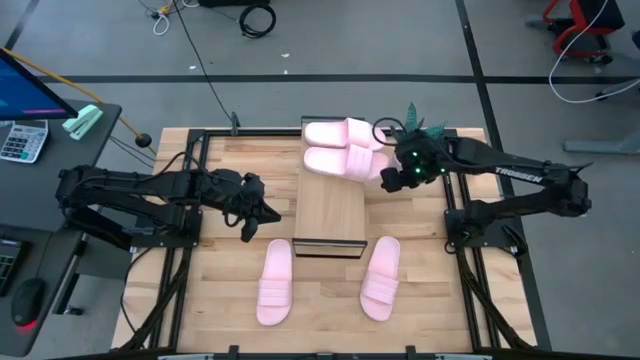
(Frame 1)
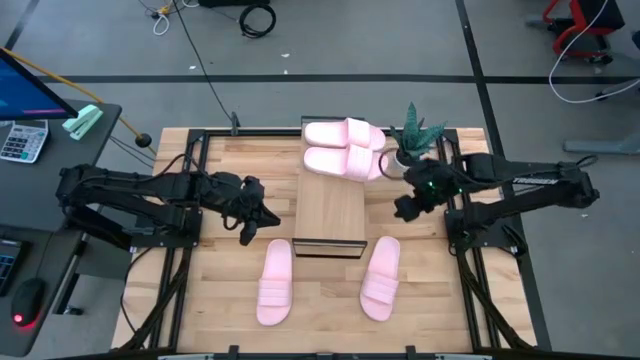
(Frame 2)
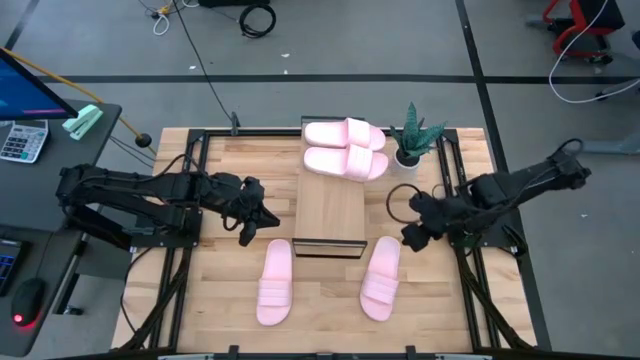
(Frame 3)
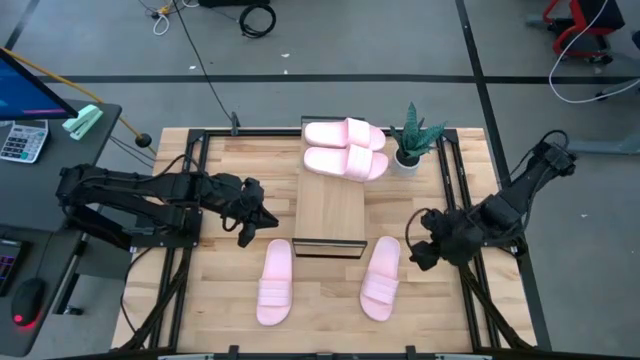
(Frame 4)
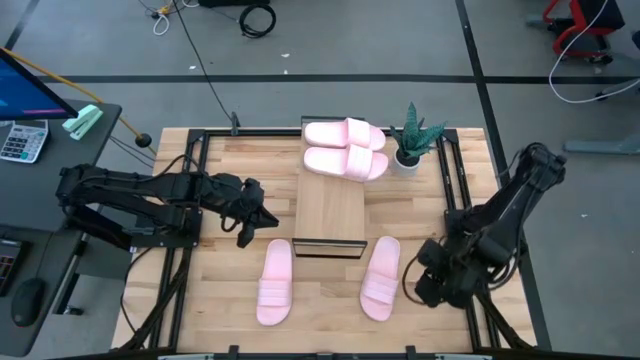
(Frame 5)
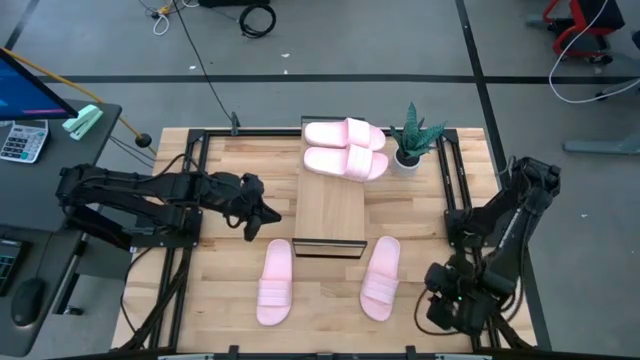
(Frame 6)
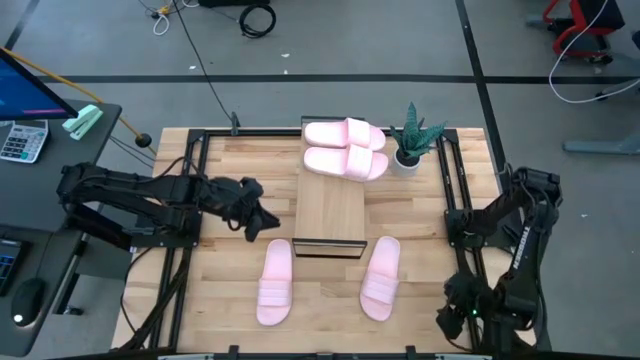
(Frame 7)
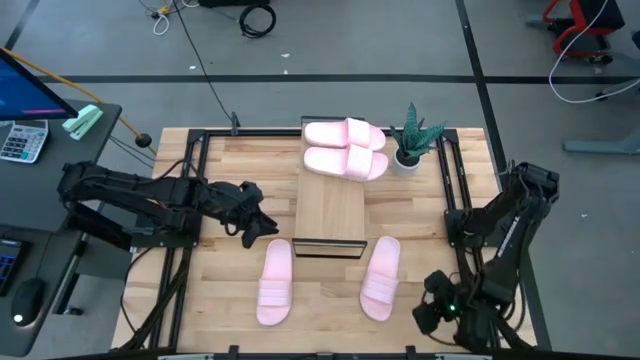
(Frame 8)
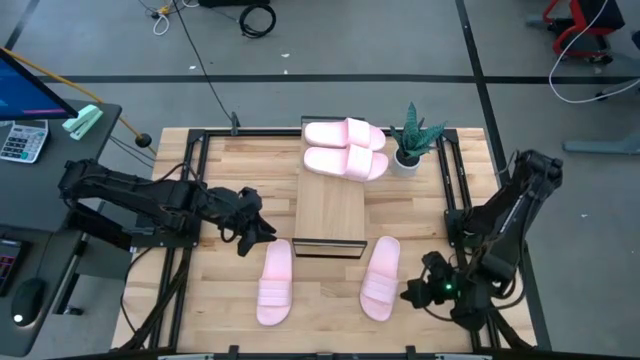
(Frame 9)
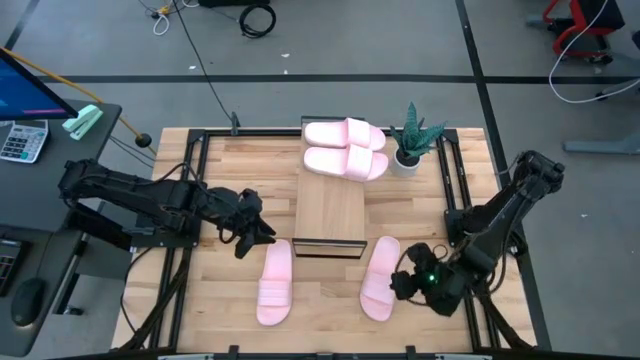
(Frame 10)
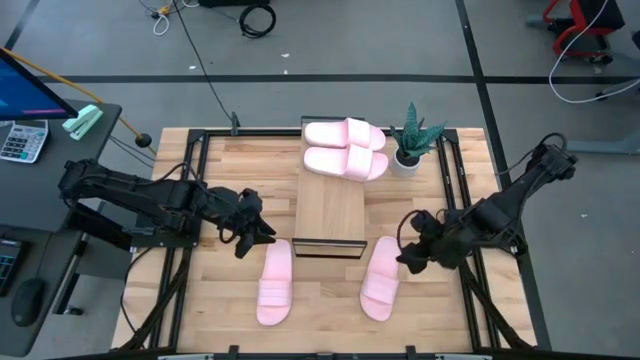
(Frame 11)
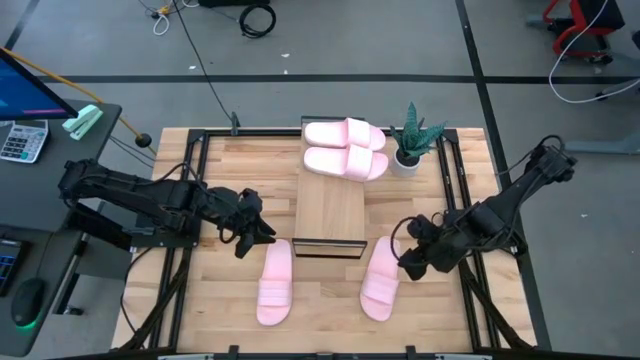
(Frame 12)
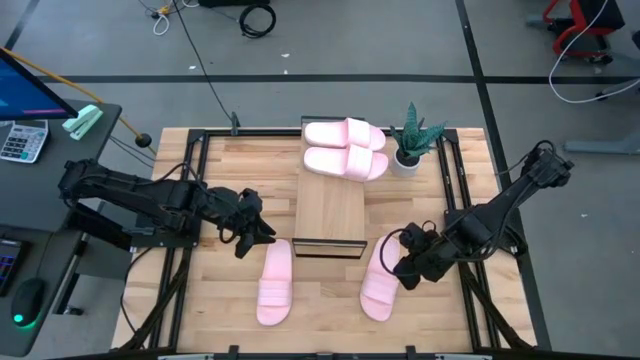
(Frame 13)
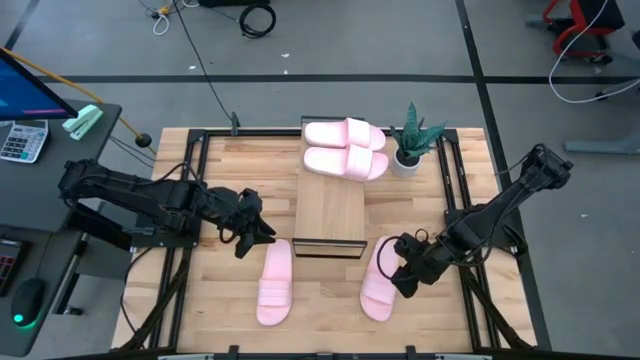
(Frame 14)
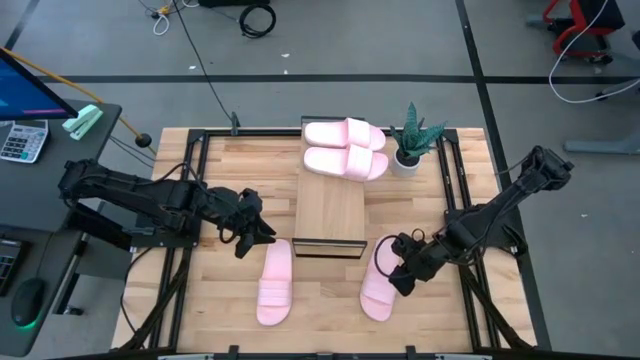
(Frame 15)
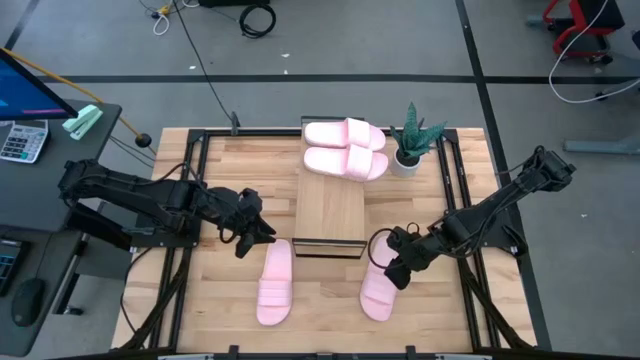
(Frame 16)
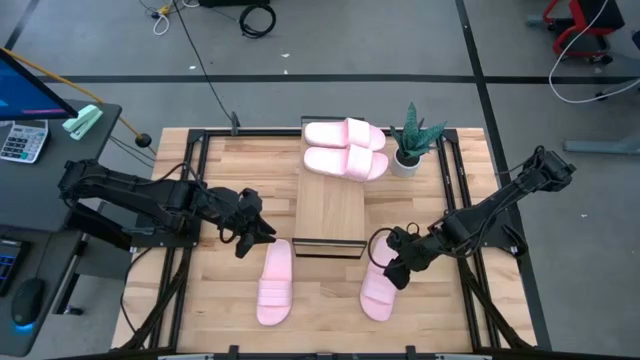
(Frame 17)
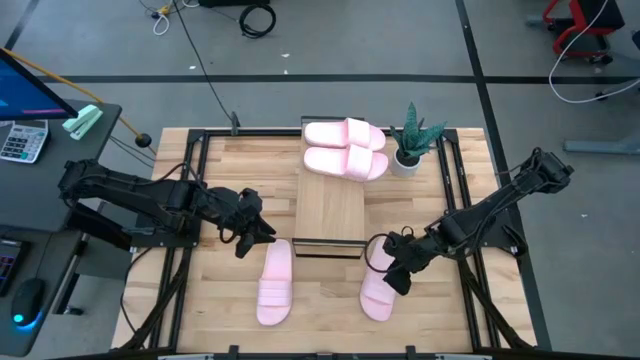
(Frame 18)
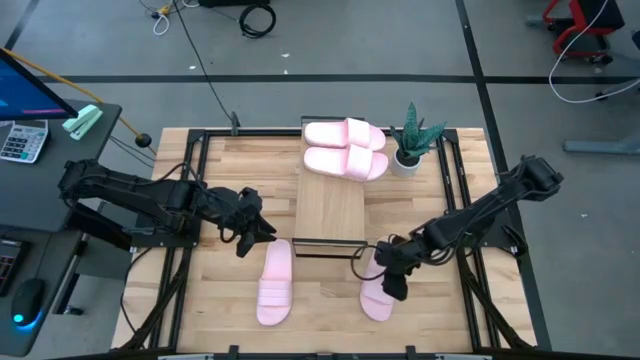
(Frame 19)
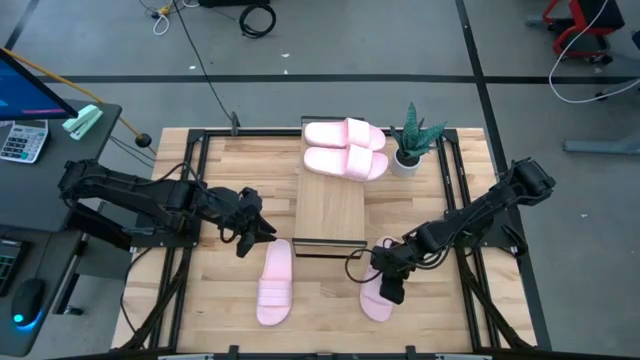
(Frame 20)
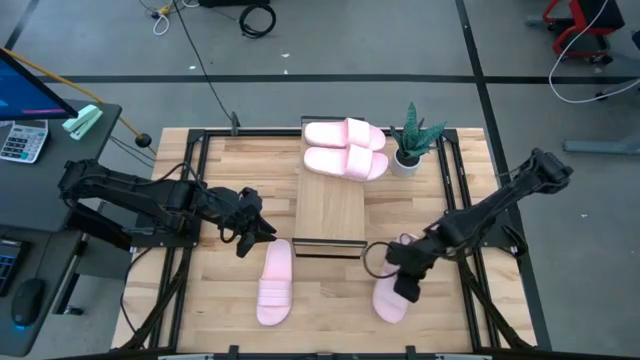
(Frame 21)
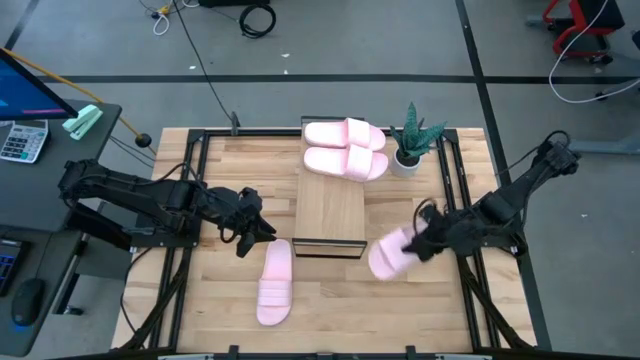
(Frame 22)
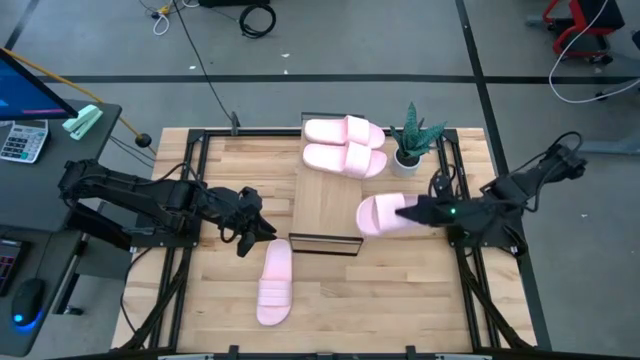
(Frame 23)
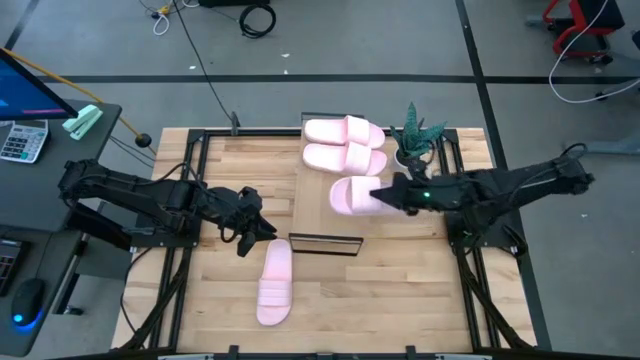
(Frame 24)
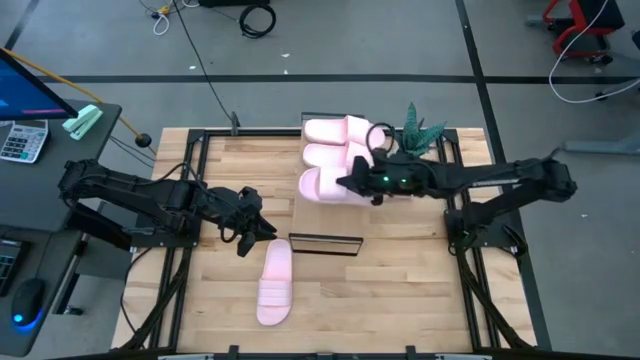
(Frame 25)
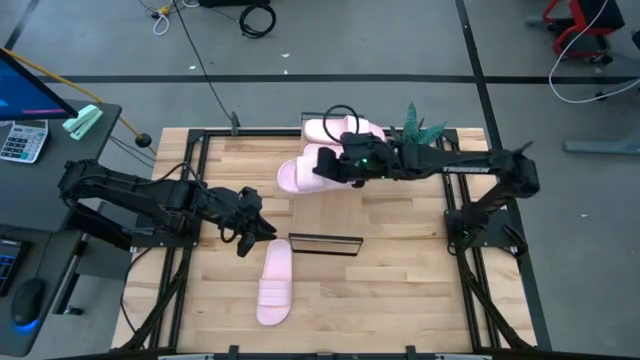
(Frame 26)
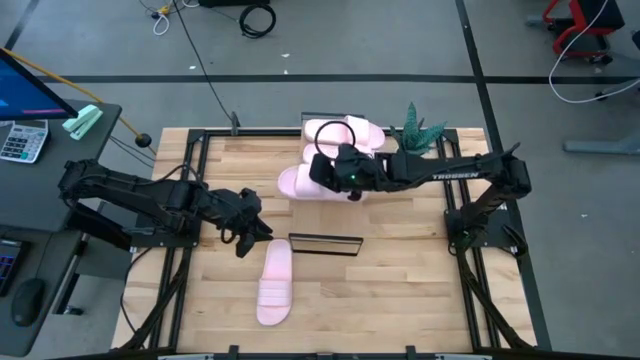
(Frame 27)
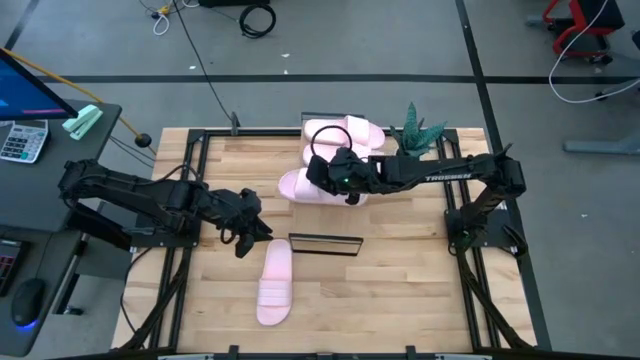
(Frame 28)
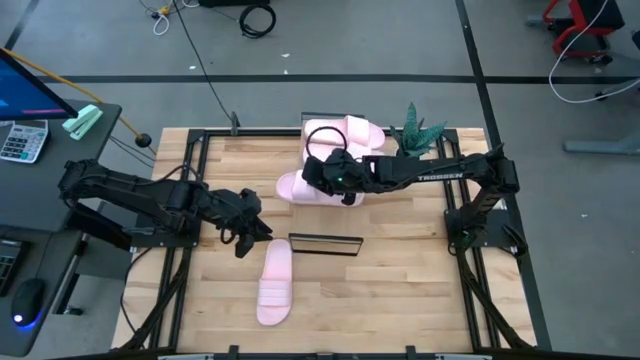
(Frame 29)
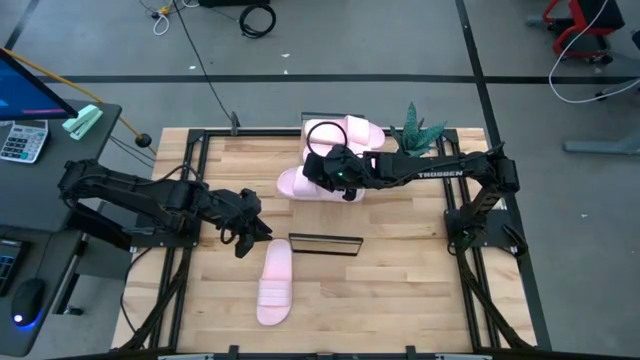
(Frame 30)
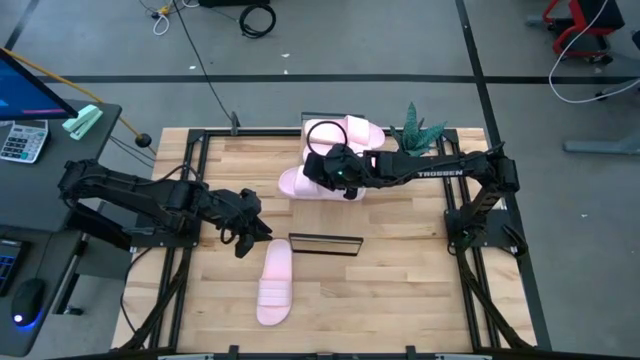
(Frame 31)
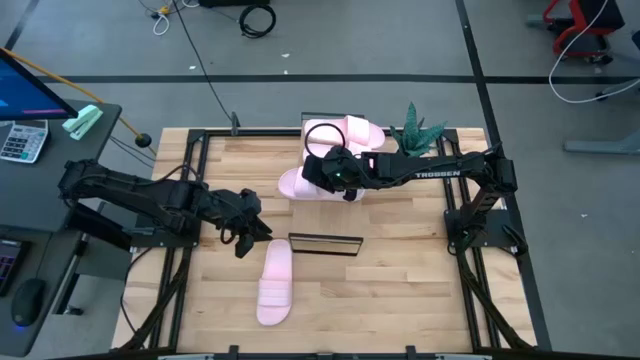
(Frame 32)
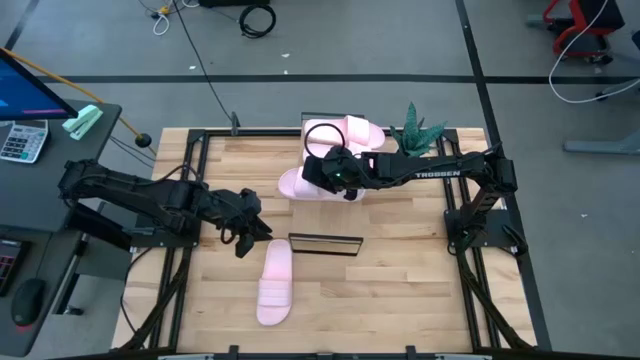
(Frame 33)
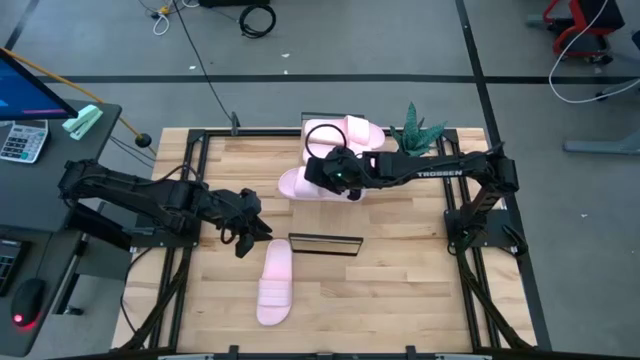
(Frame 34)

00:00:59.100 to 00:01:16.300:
Task: Pick and place slides into the shelf
Put the pink slide on the shelf

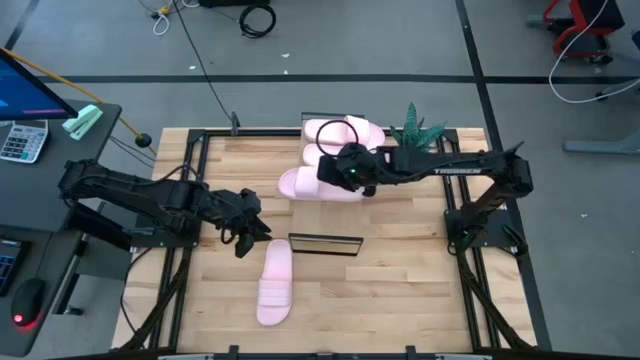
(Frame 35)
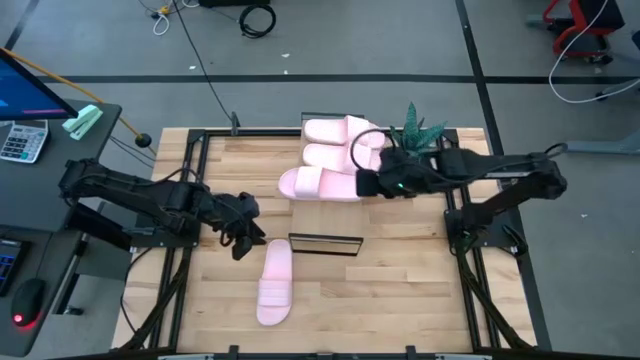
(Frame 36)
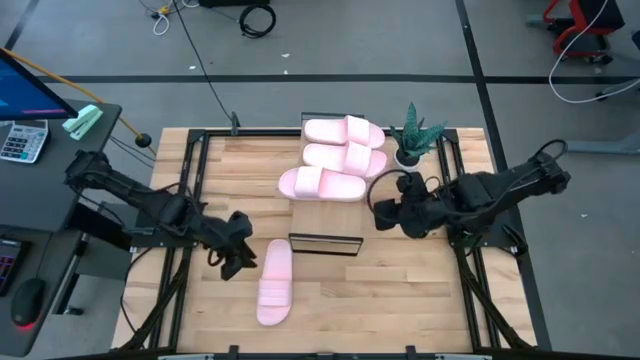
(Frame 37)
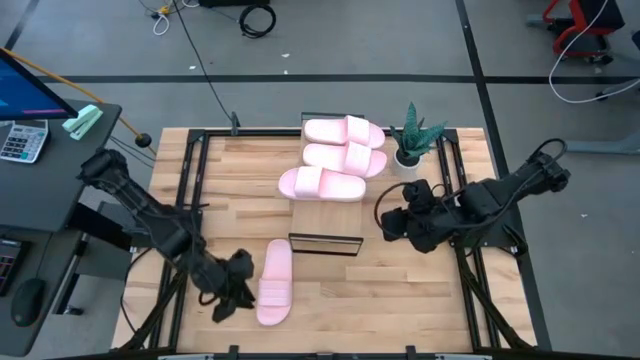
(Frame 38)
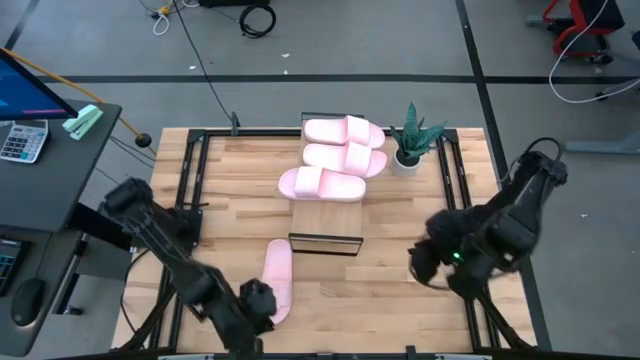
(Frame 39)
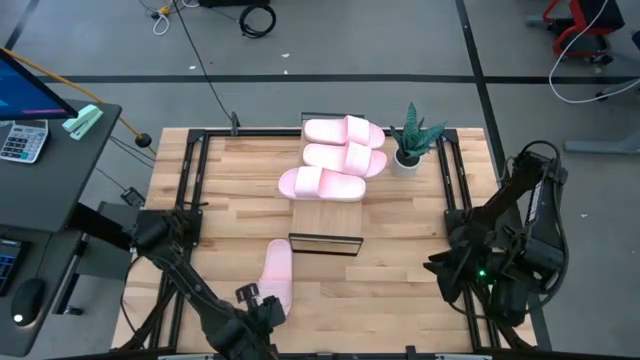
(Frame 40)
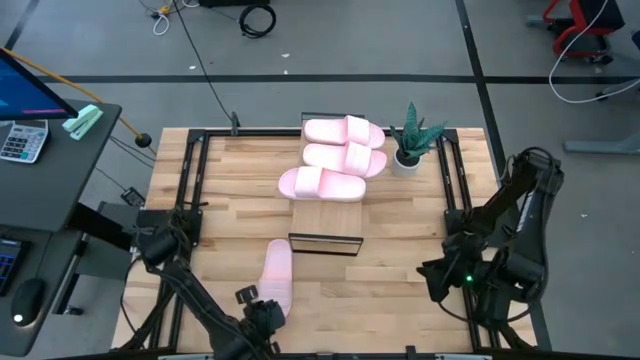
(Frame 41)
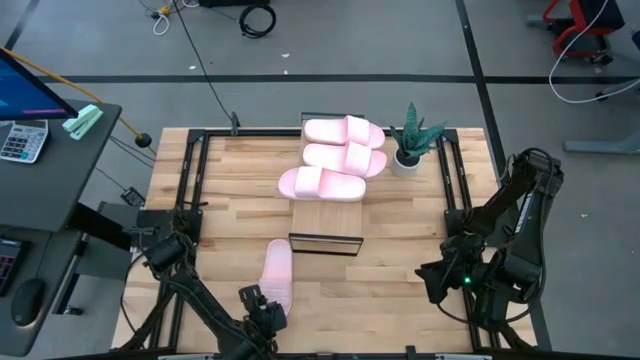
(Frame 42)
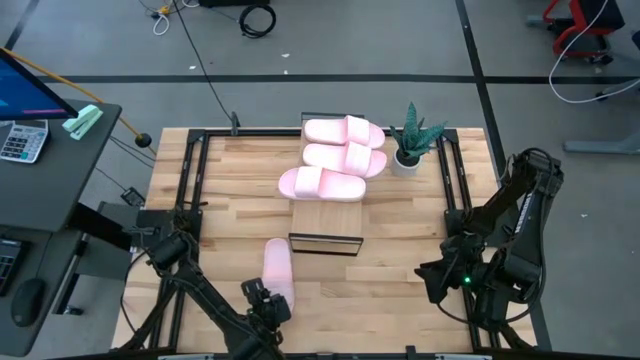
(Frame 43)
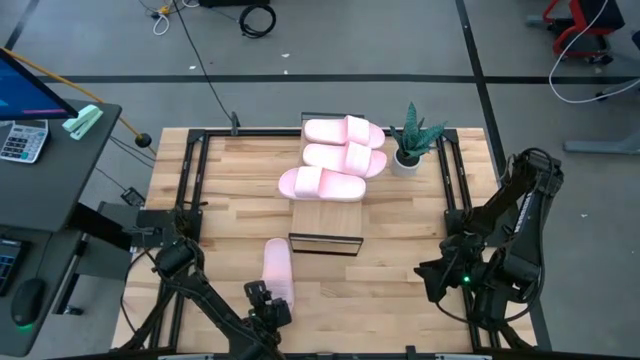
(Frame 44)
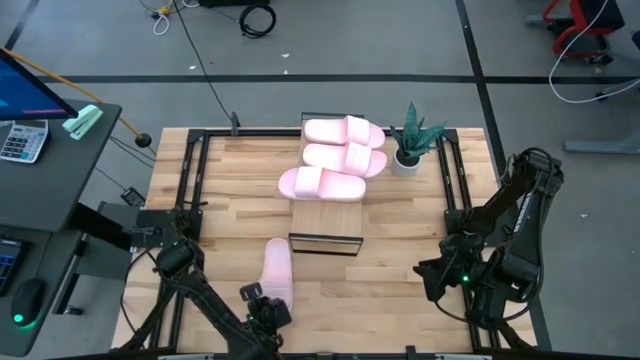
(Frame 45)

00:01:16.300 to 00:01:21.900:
Put the pink slide on the shelf
